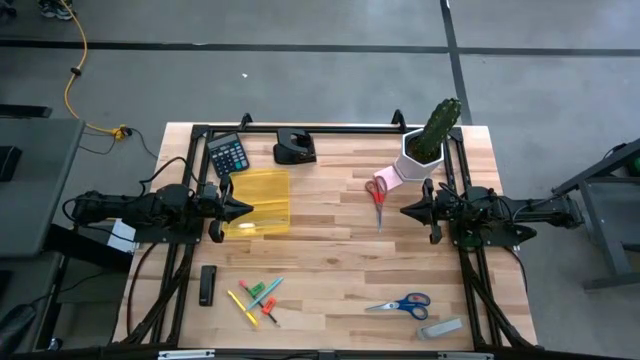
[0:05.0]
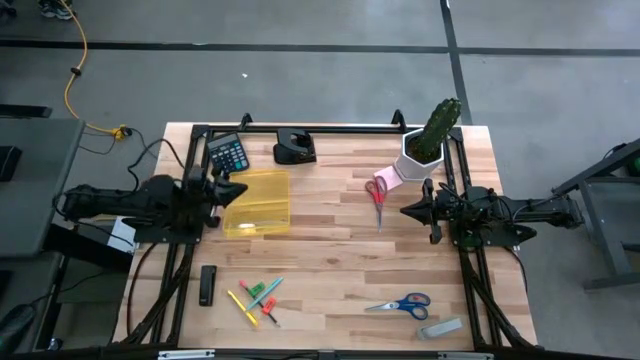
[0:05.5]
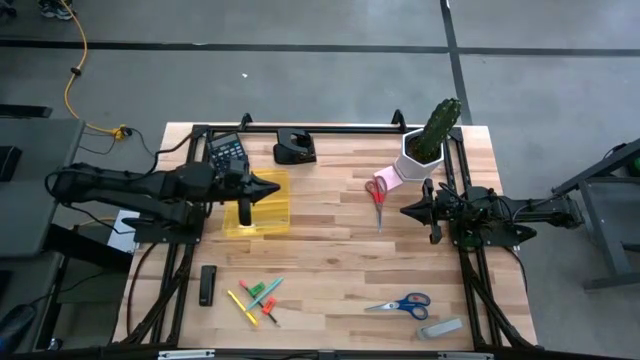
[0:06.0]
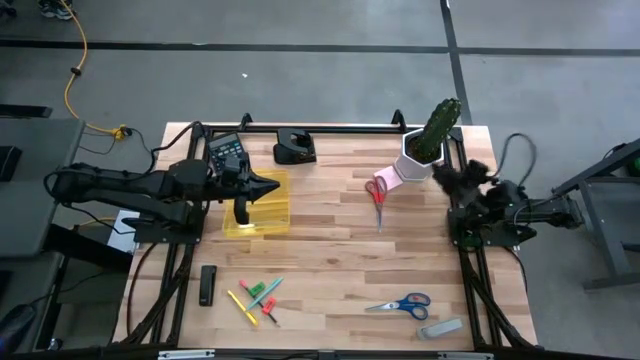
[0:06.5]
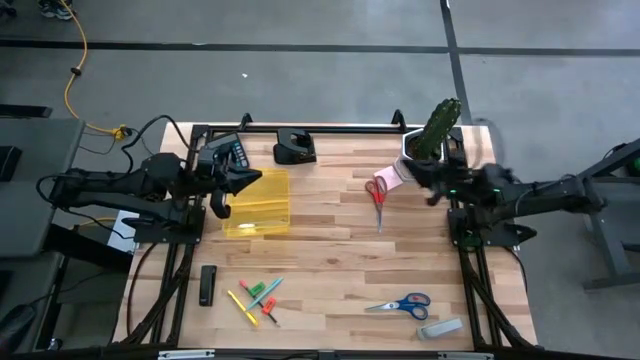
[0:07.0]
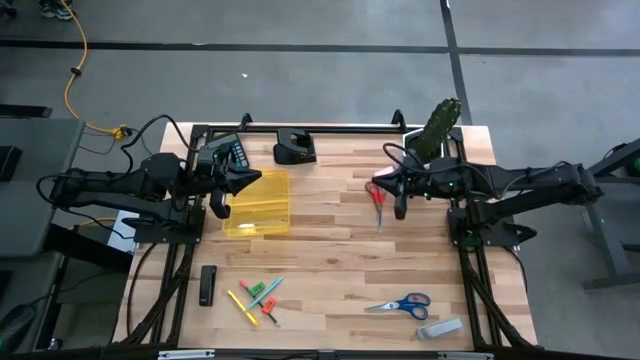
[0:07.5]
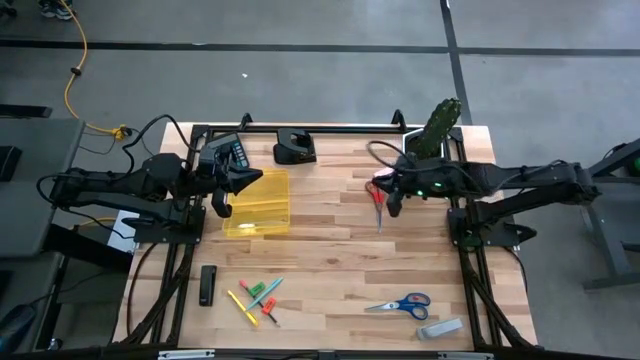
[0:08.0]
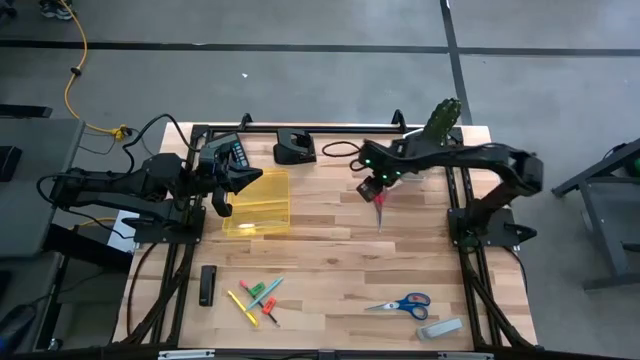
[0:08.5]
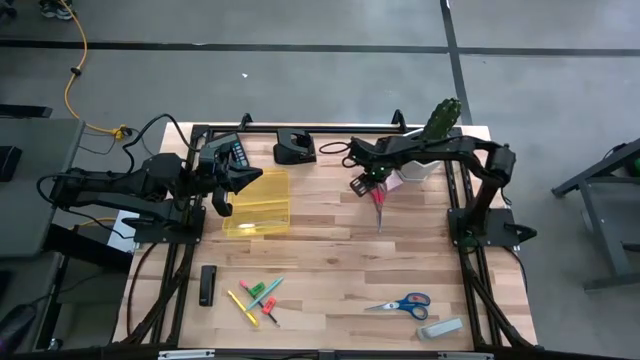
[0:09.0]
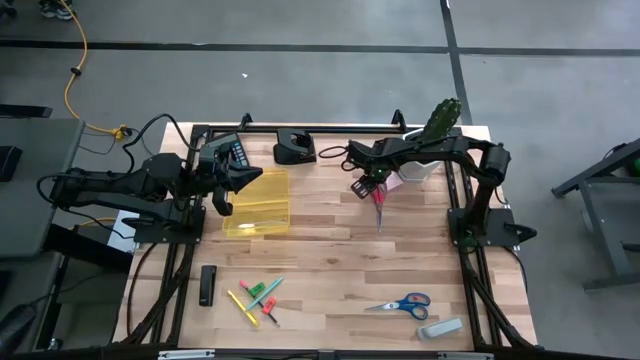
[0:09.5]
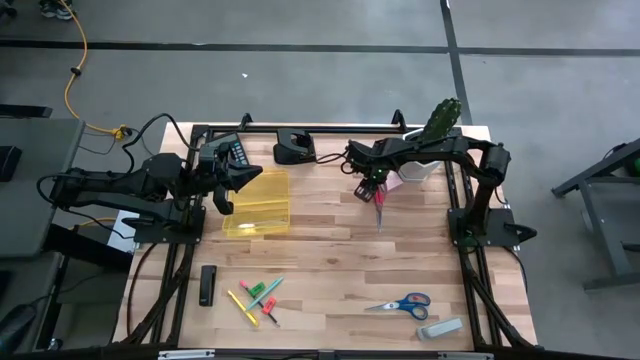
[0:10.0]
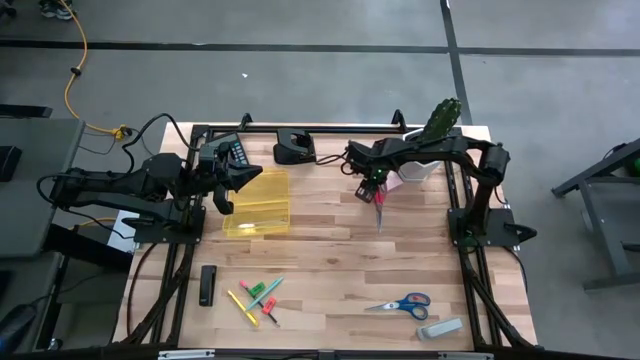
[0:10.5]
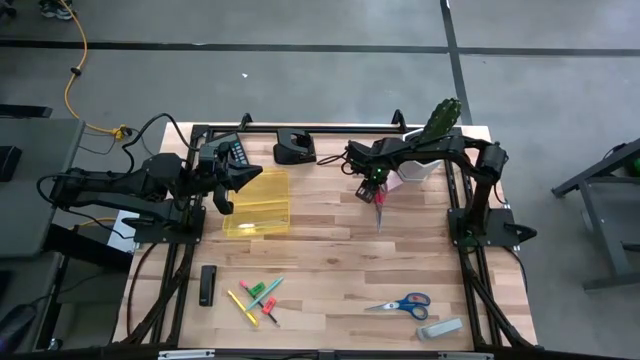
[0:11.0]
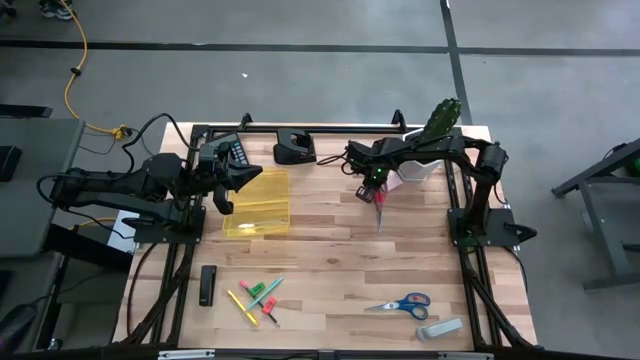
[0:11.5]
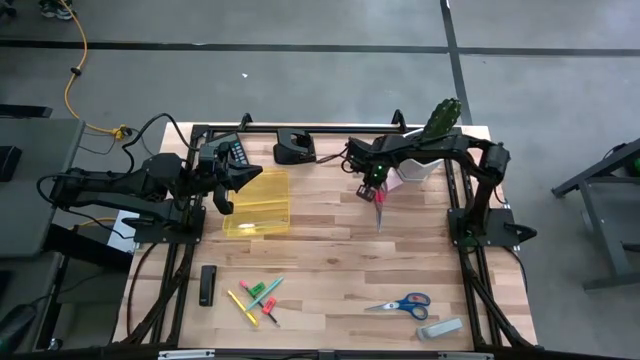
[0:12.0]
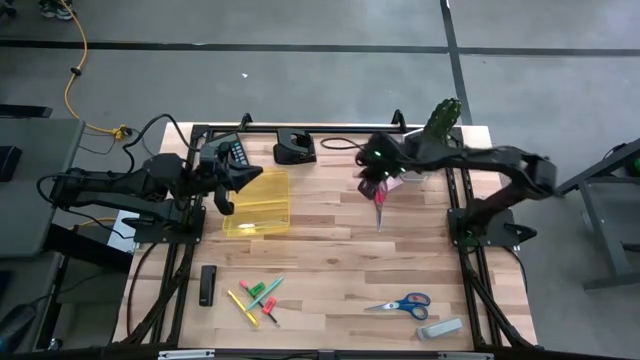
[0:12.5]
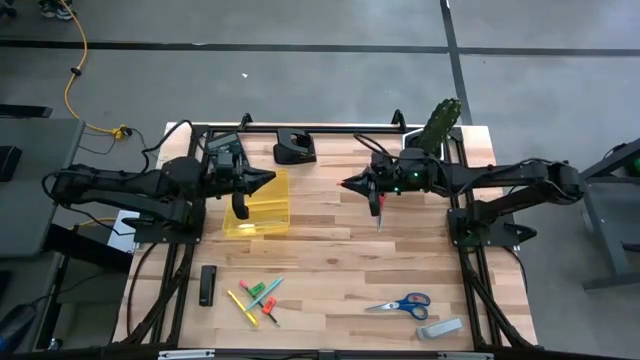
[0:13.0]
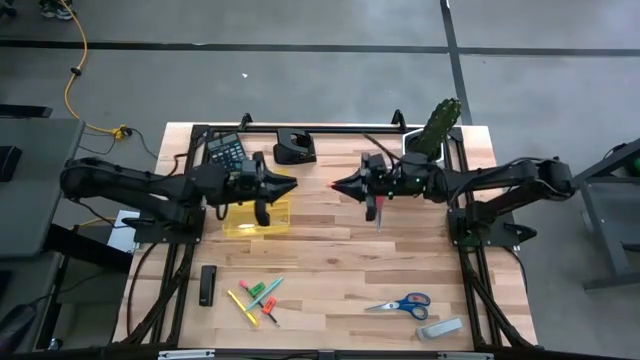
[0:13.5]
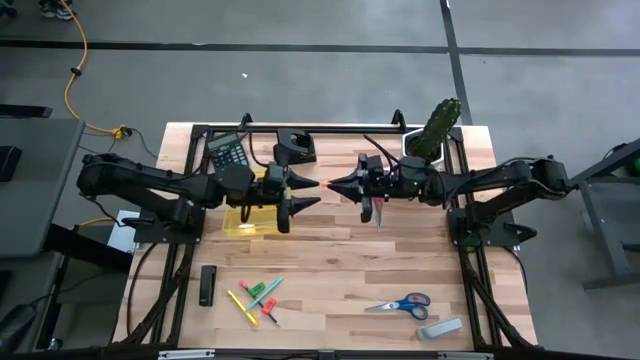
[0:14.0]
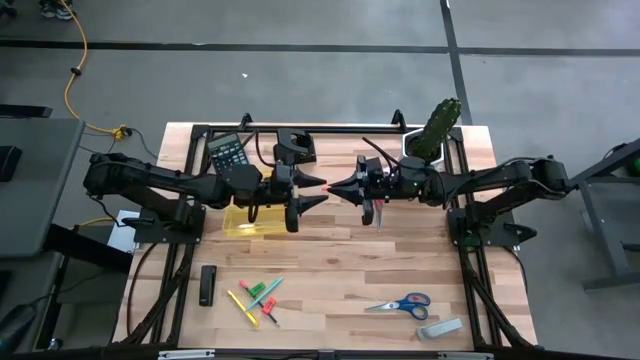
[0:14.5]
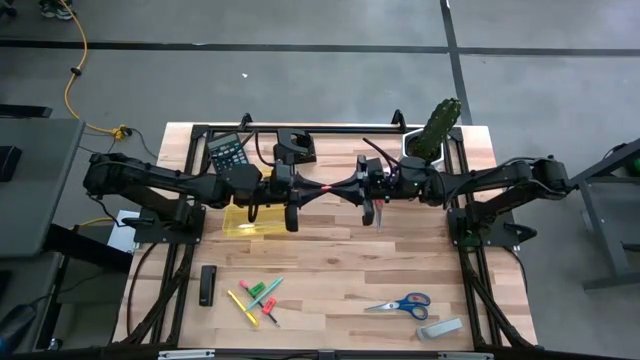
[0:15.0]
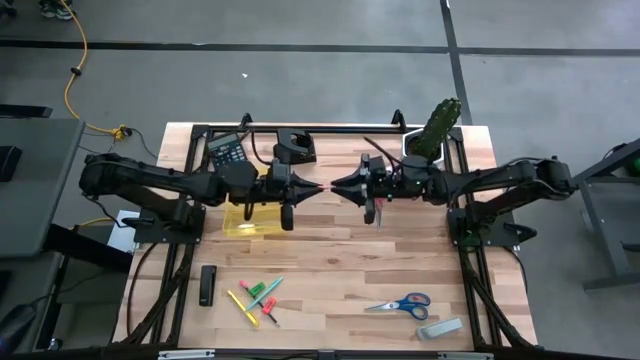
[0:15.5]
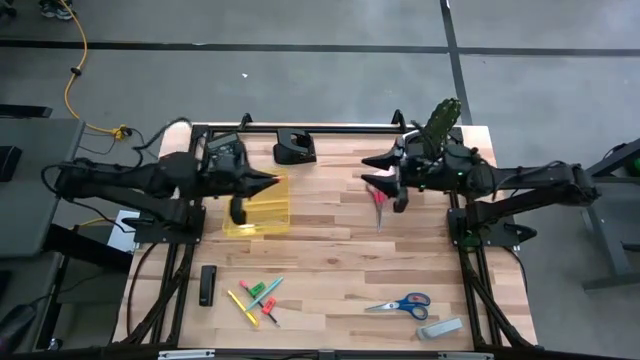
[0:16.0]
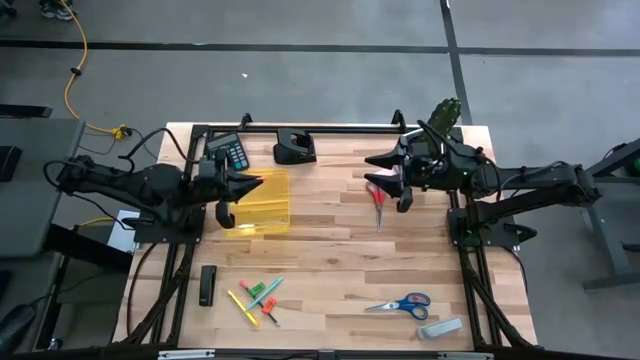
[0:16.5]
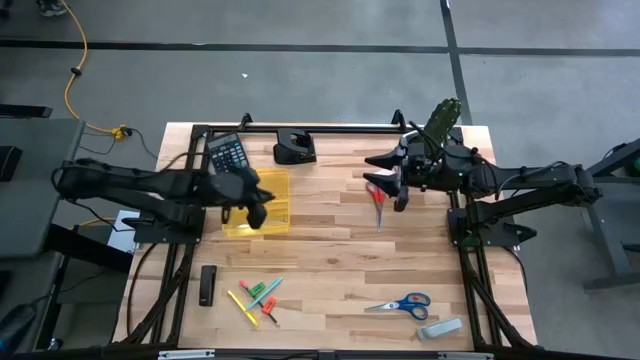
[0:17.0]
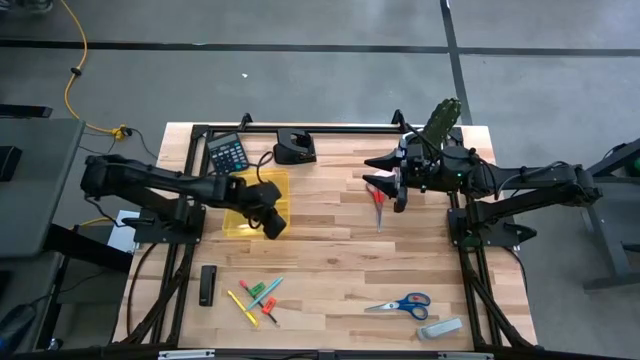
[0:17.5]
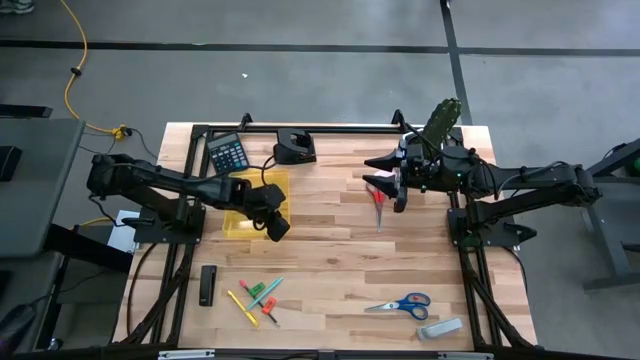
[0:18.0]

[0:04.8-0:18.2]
Task: Pack school essentials
Put the orange pencil top eraser into the yellow supply box

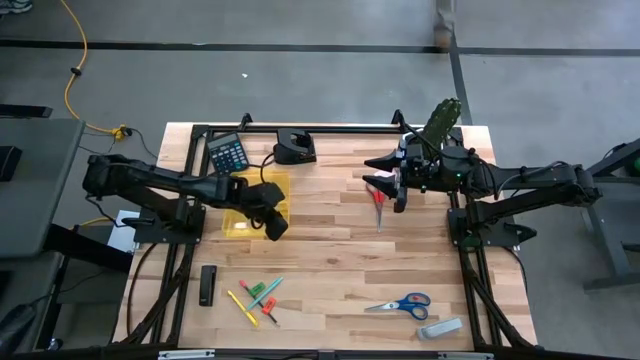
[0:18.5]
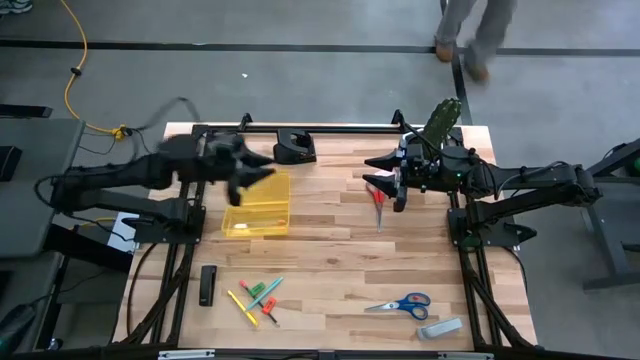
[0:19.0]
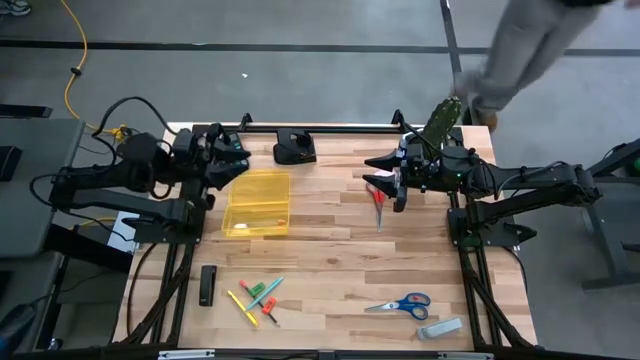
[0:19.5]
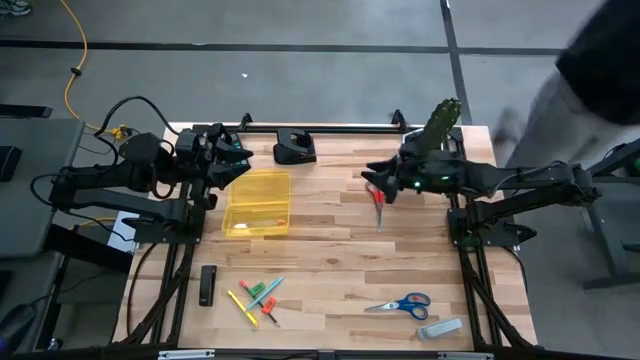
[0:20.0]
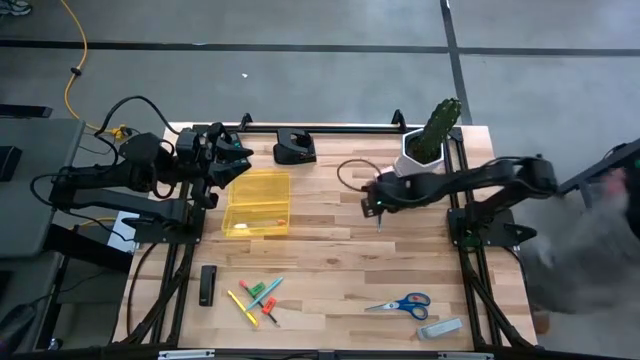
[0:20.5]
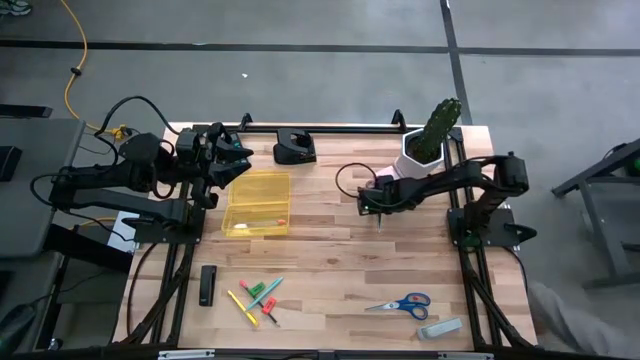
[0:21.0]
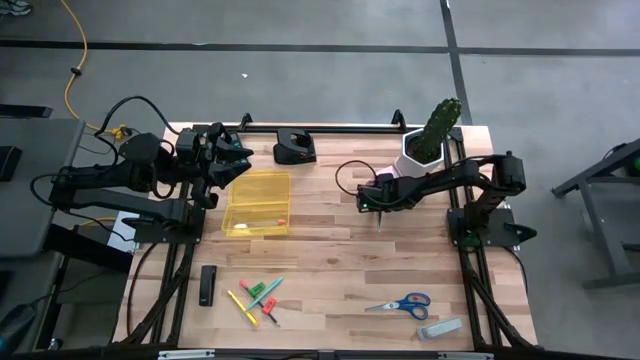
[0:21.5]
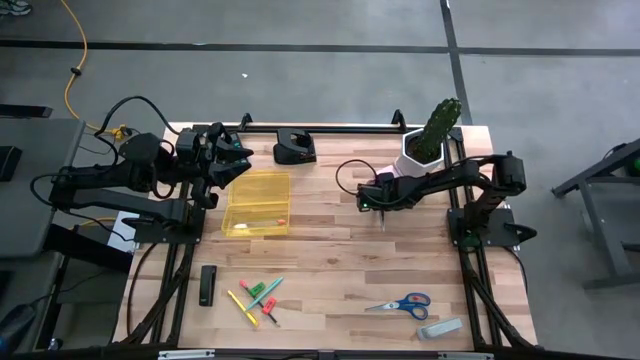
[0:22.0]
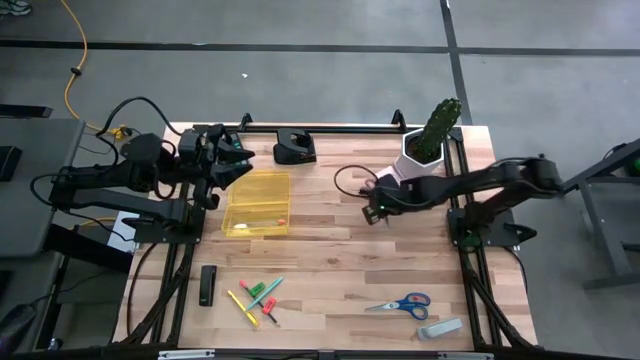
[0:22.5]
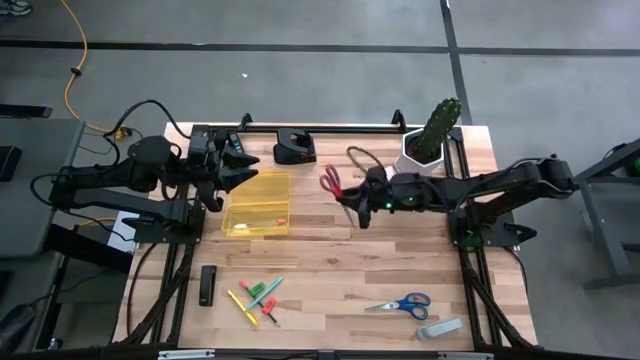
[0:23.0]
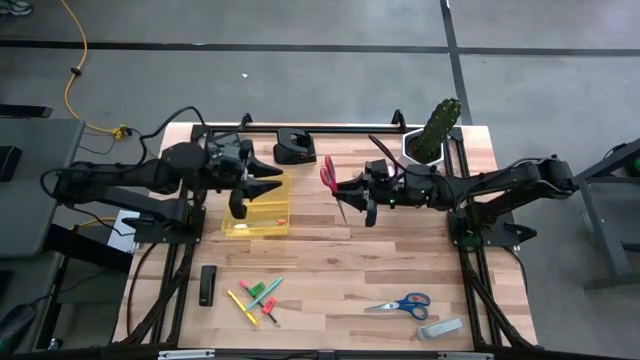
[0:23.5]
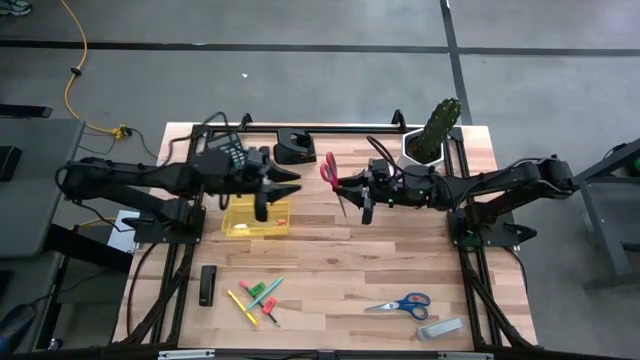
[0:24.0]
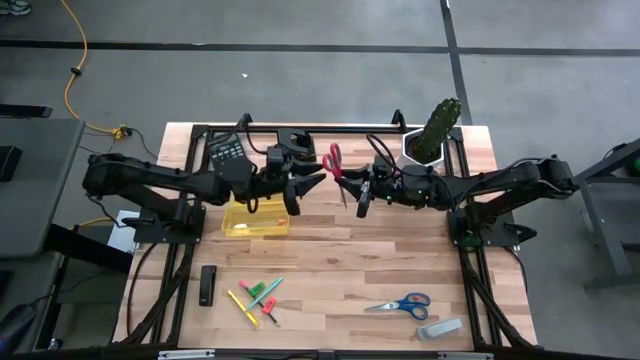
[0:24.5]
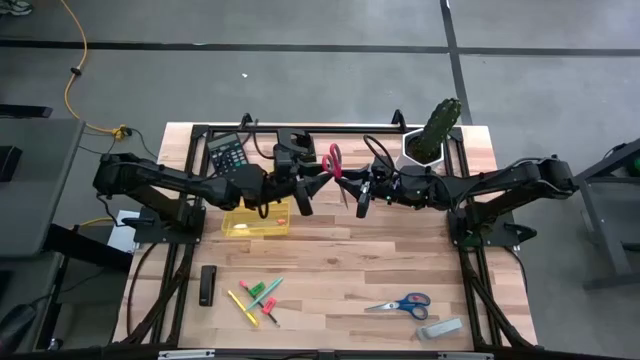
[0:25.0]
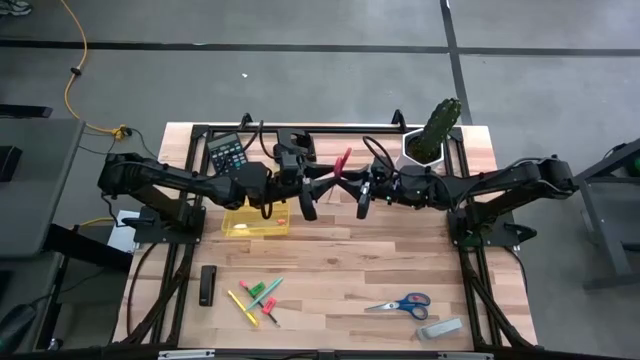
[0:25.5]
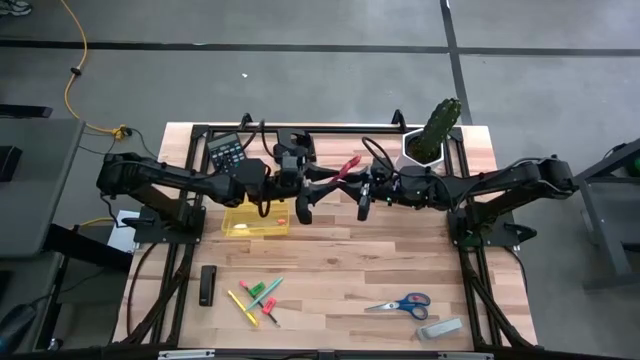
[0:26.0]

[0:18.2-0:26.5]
Put the red scissors into the yellow supply box

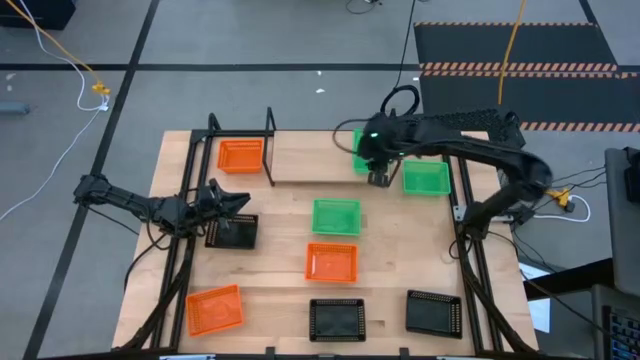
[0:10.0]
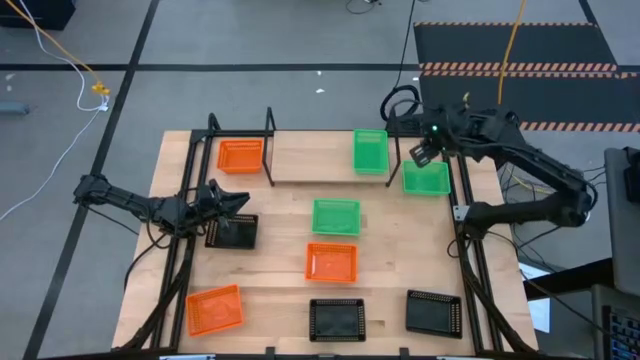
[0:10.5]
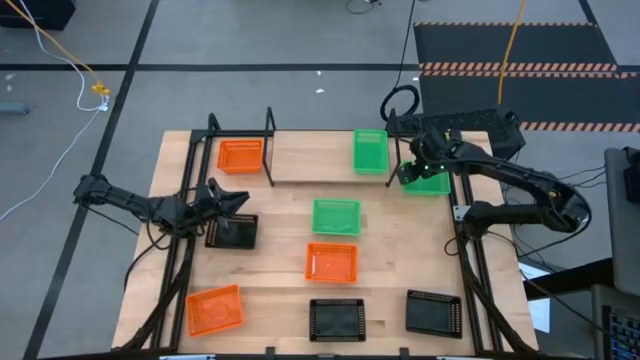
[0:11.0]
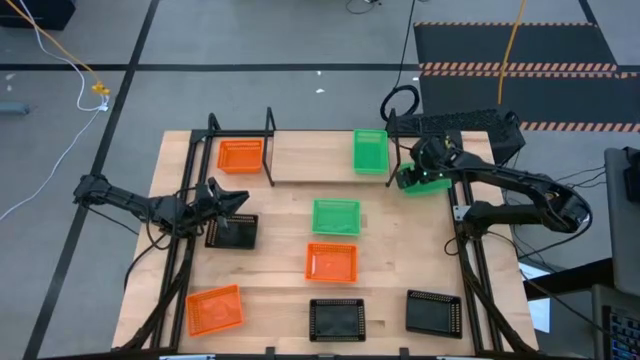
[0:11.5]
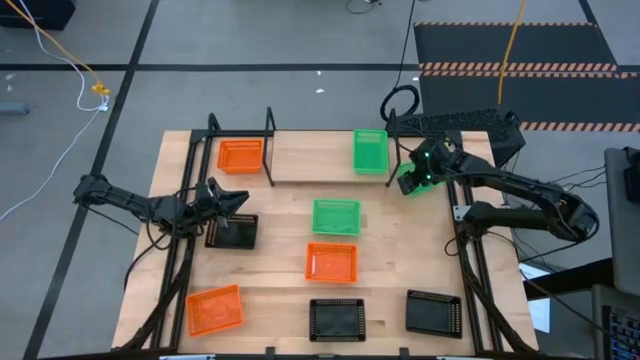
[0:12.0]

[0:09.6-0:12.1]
Task: Stack baskets on shelf by color
Stack the right green bin on top of the green bin on the shelf
